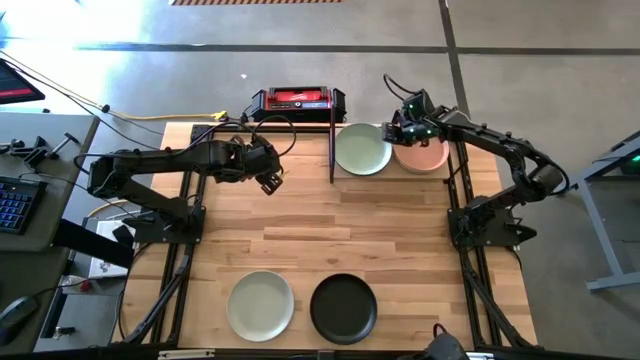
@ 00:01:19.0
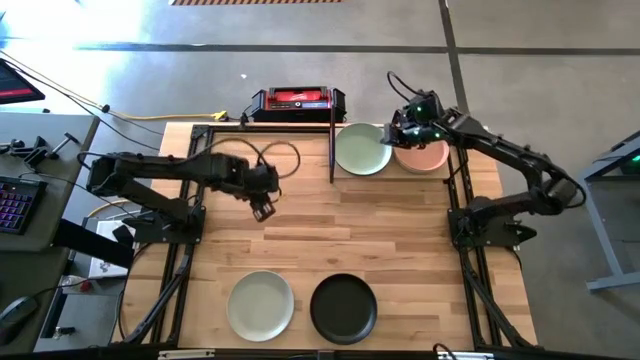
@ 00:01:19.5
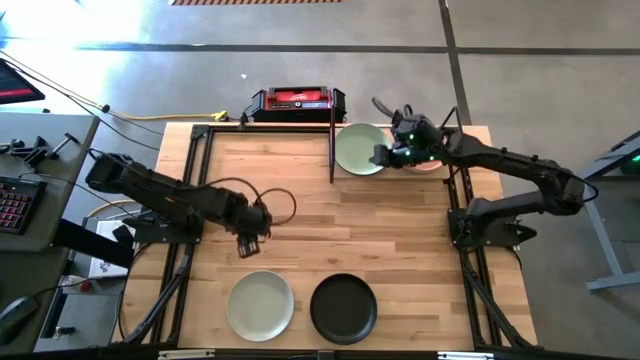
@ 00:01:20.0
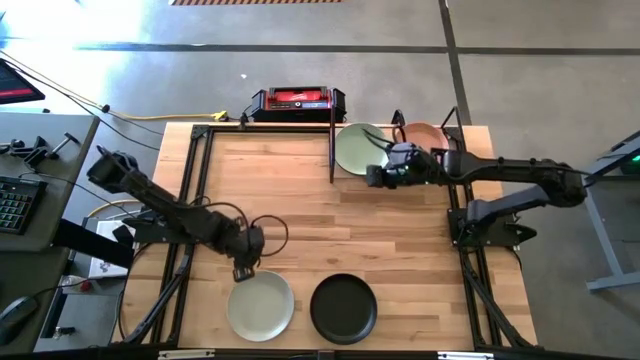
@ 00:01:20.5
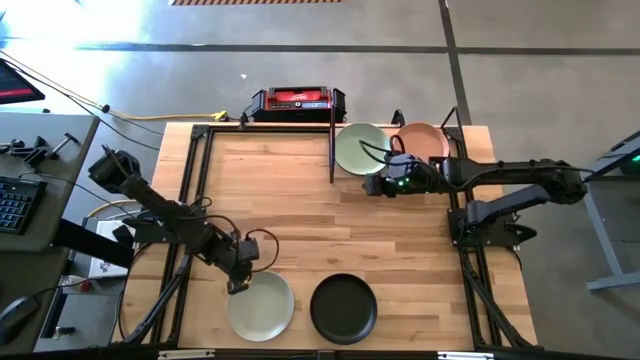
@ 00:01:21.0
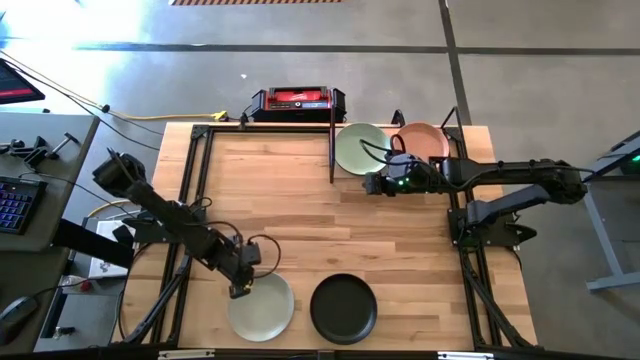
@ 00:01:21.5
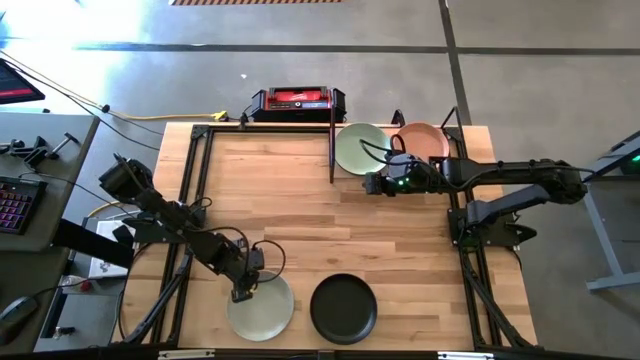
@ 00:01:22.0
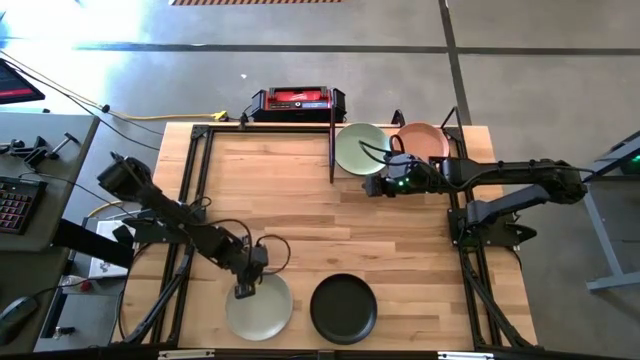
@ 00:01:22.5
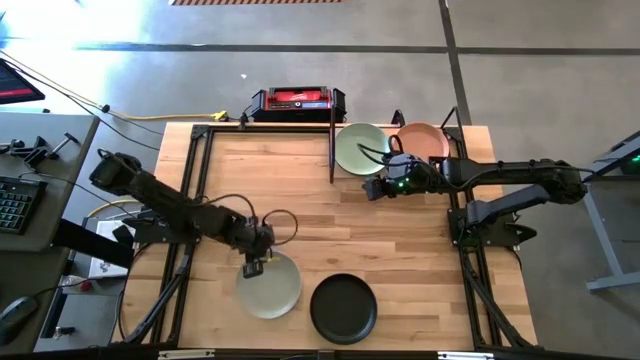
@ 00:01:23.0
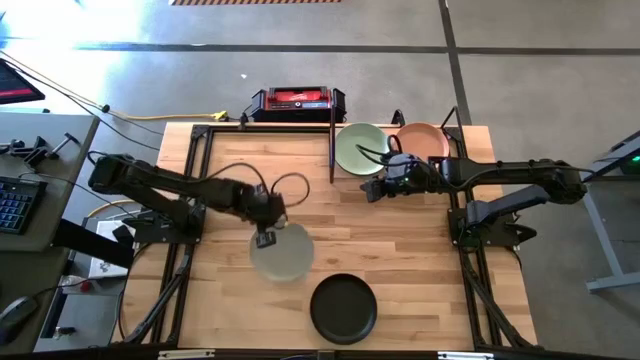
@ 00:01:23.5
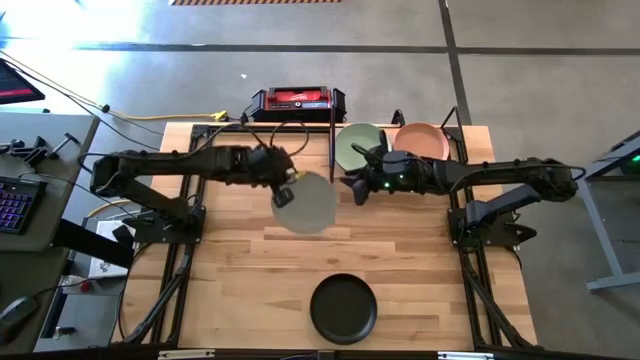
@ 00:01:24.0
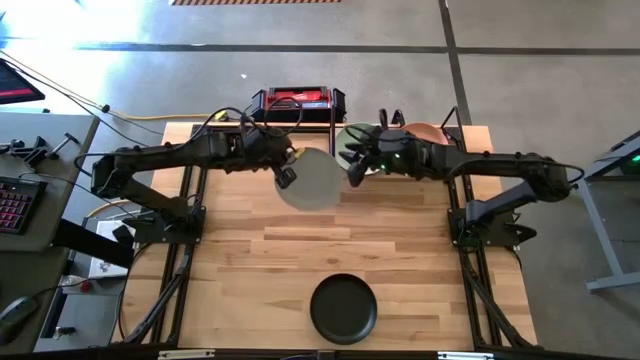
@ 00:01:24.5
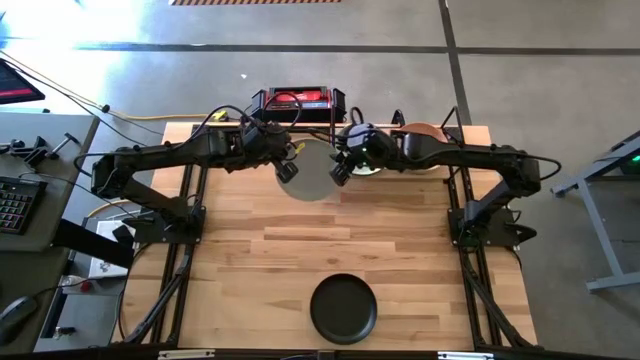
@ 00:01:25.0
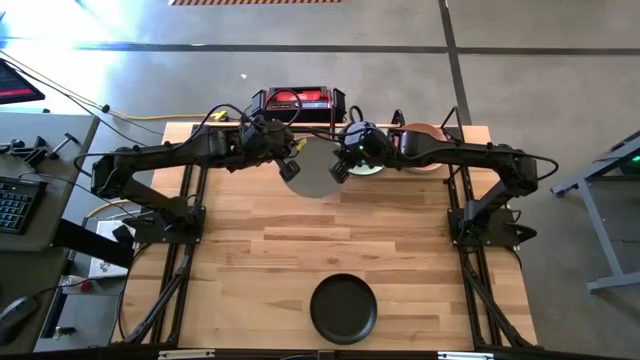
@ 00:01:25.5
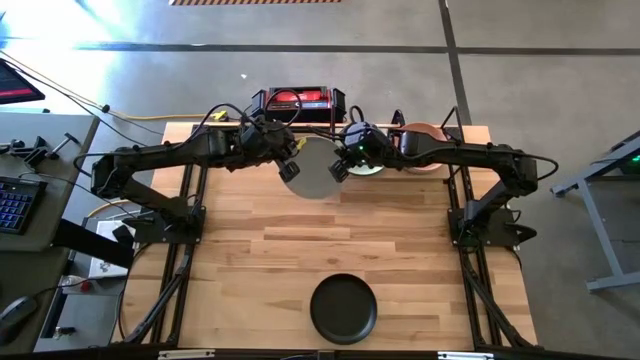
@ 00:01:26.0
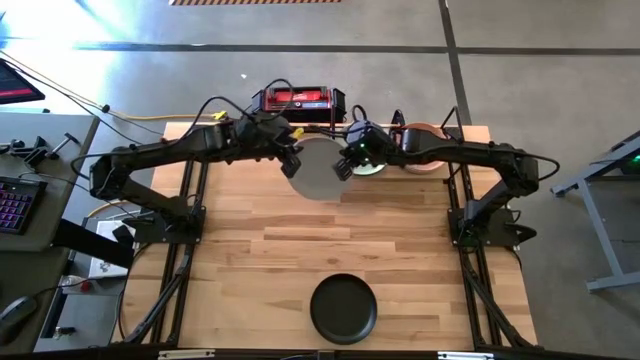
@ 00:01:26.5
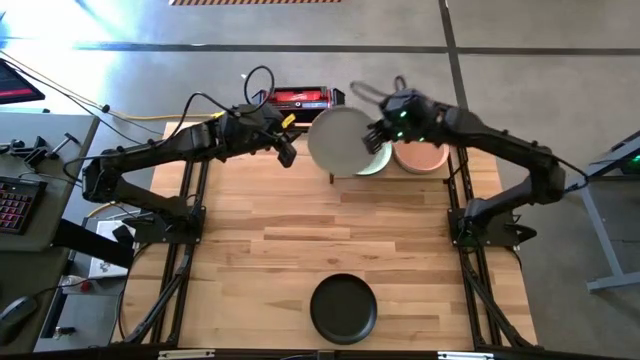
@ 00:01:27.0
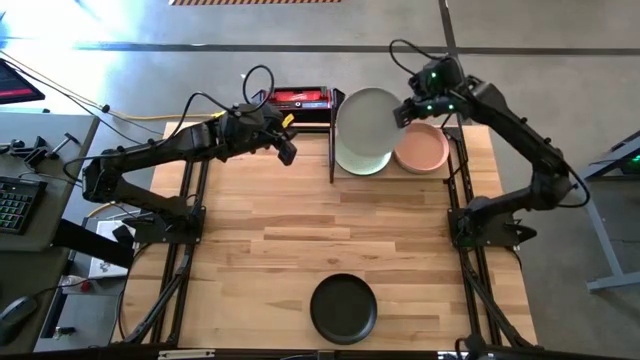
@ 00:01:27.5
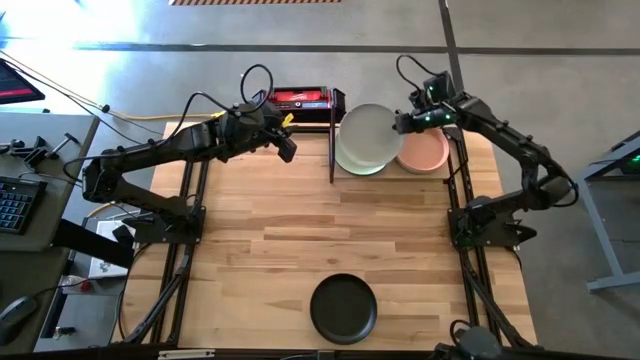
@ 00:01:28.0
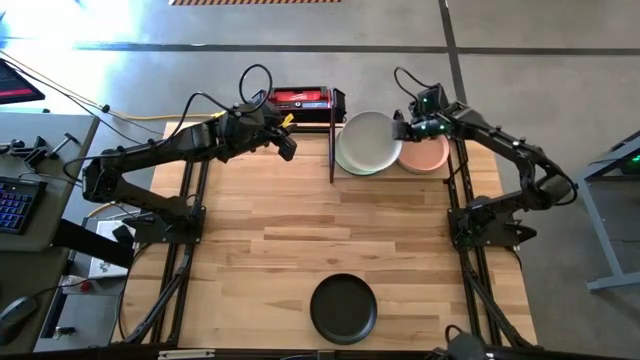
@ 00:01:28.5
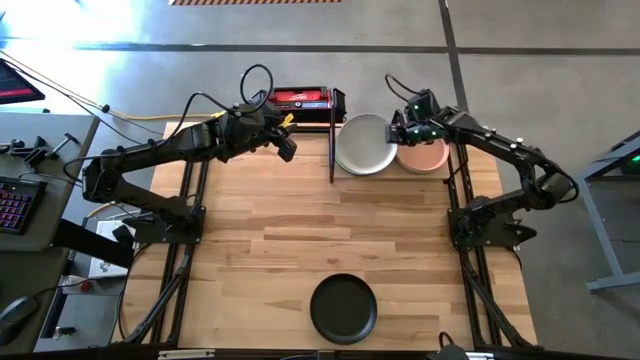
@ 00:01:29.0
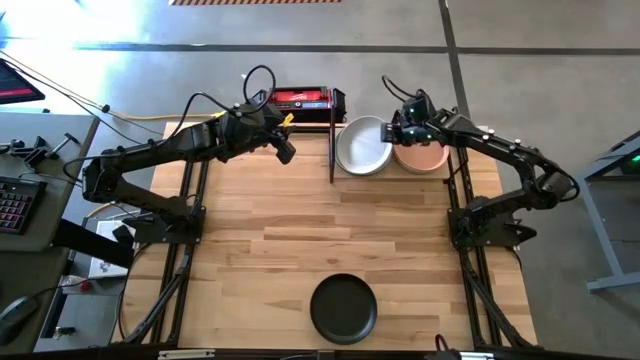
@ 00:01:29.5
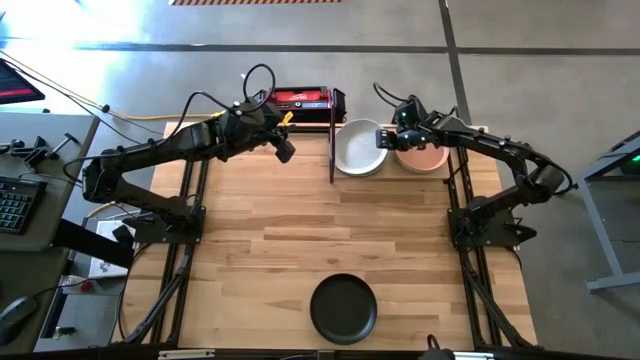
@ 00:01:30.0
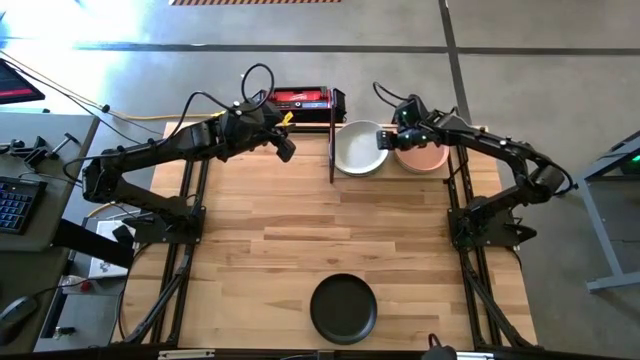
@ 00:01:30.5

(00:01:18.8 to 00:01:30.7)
Task: Place and stack plates onto a shelf
Stack the white plate on top of the light green plate on the shelf

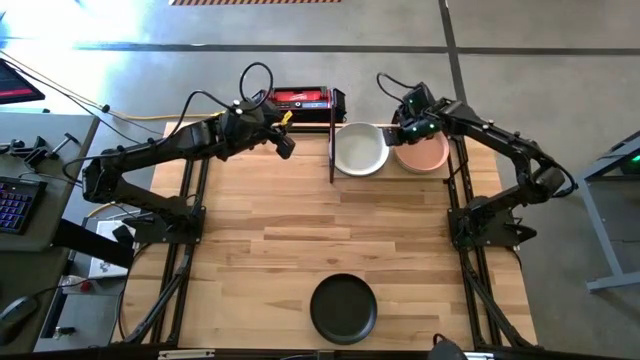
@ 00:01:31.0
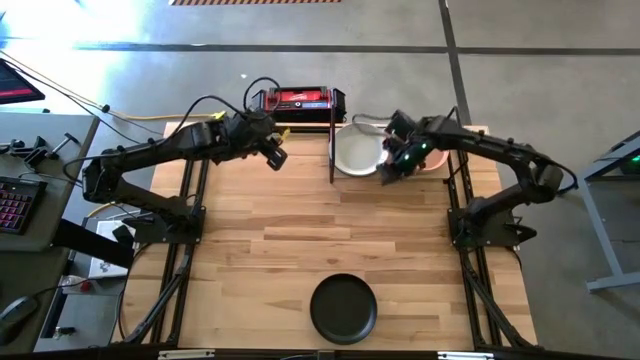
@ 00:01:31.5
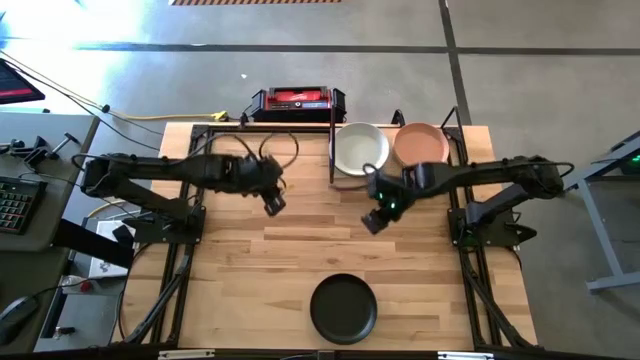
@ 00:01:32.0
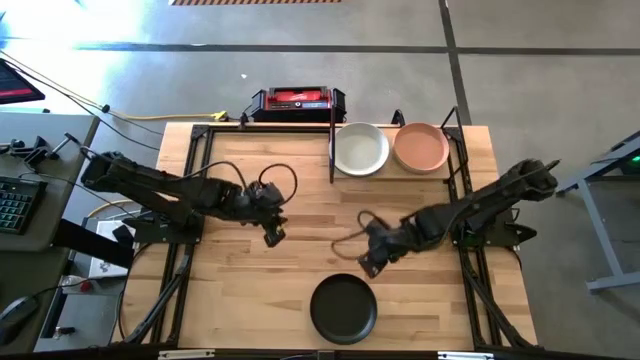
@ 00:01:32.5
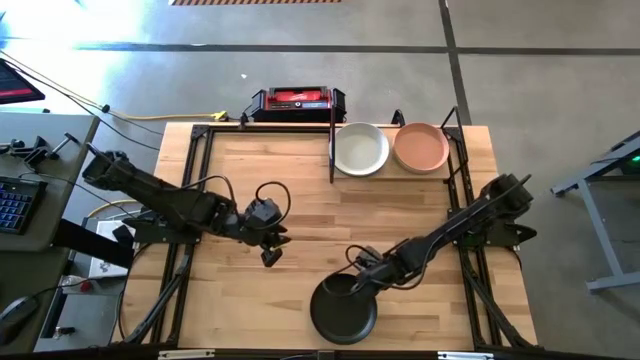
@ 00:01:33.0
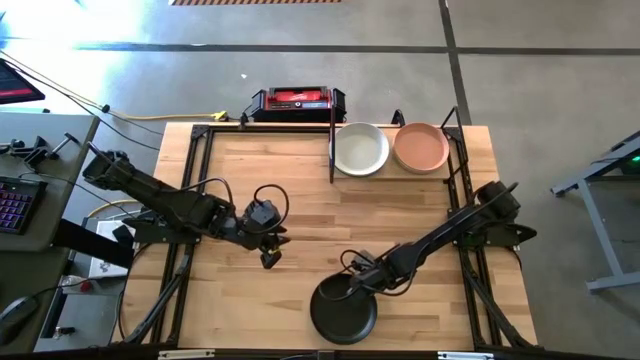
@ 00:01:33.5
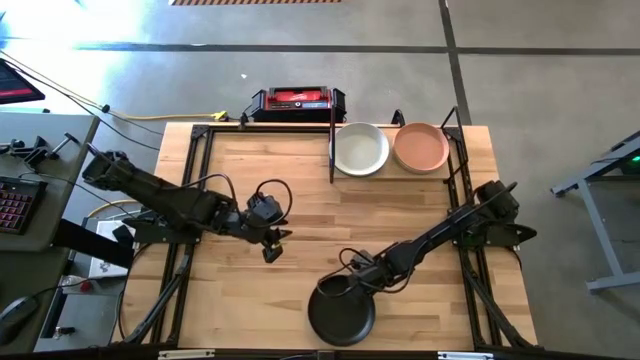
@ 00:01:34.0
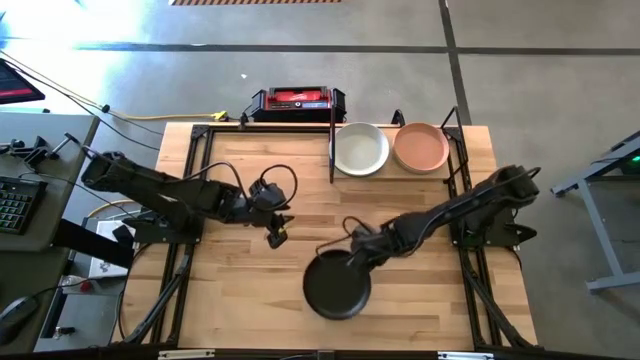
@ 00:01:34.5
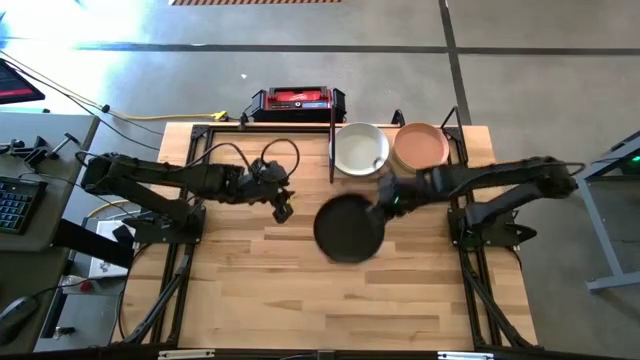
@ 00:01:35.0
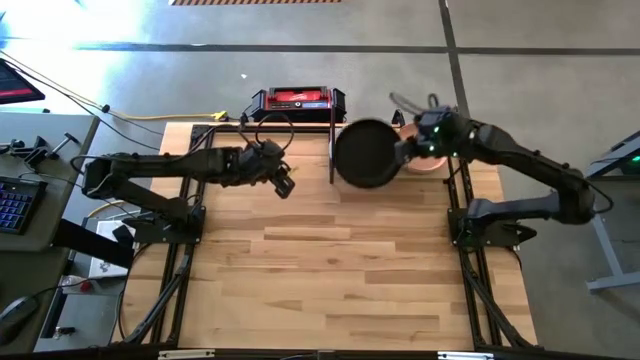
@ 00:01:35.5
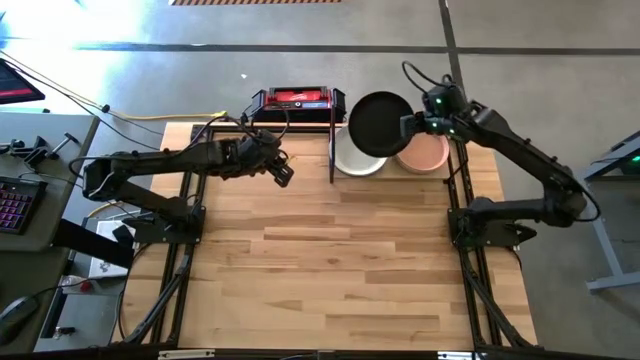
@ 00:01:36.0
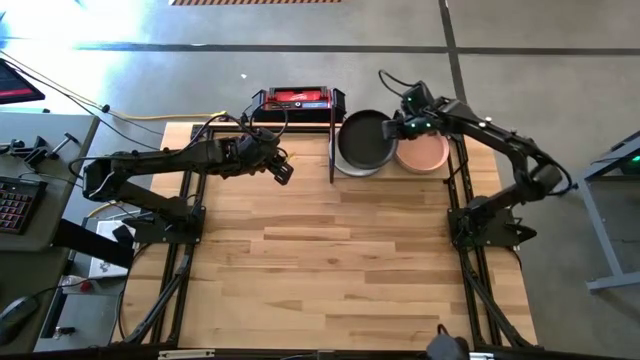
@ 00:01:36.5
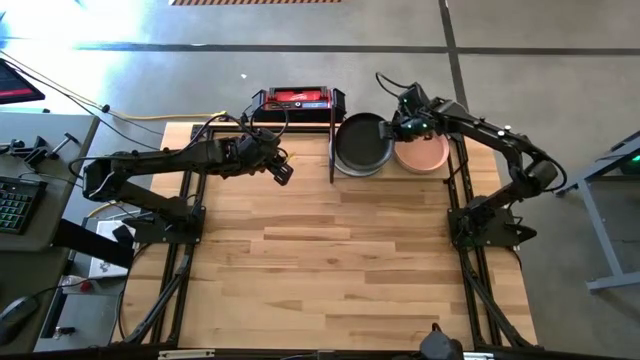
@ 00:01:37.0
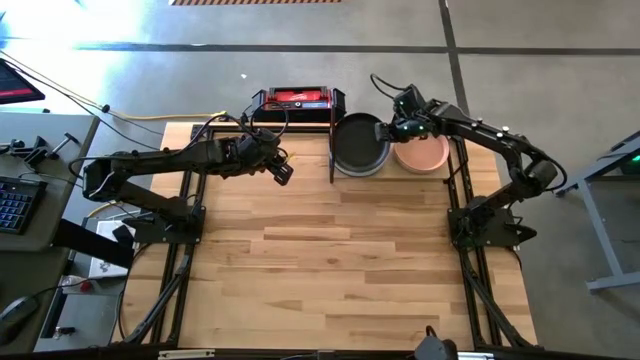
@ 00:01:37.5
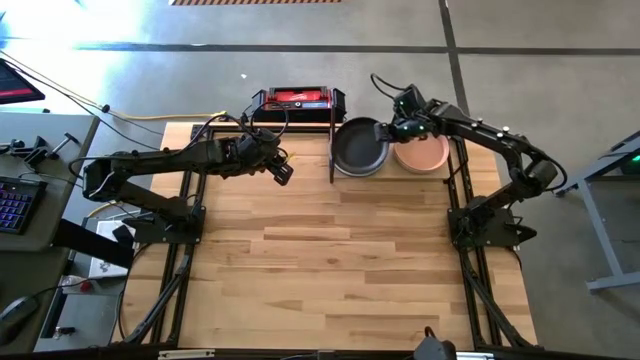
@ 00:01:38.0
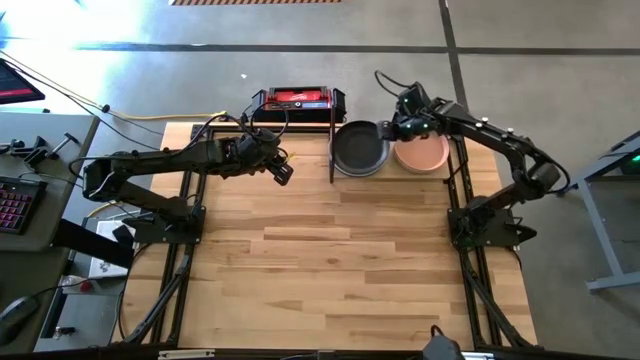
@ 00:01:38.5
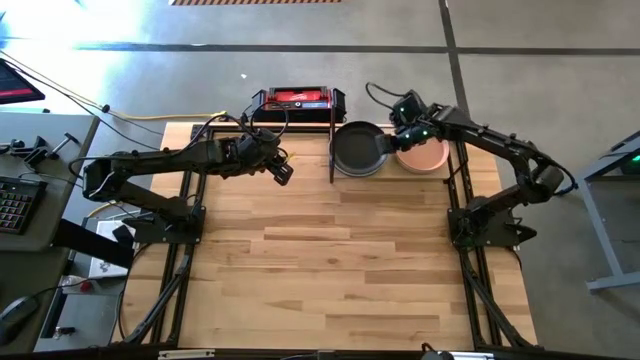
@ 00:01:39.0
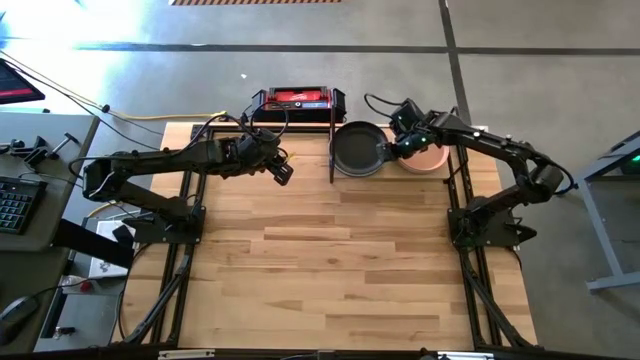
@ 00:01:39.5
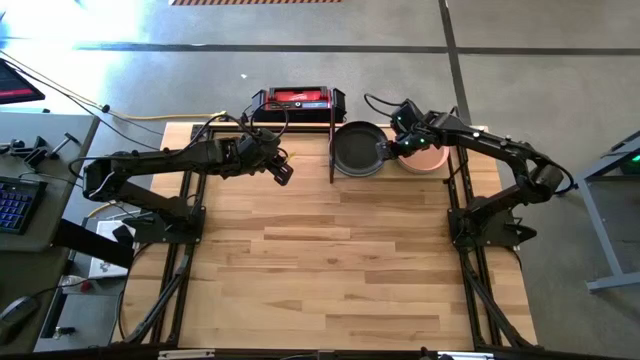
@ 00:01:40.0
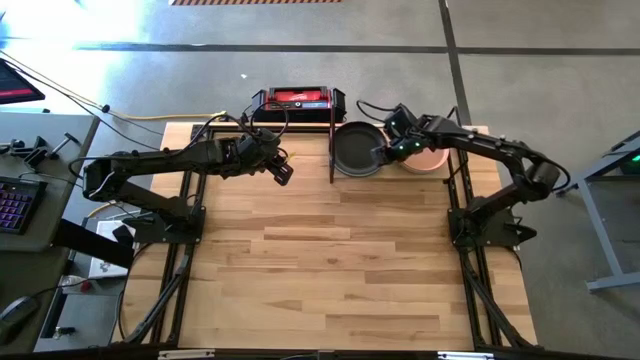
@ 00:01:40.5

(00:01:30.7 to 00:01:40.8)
Stack the black plate on top of the light blue plate on the shelf
